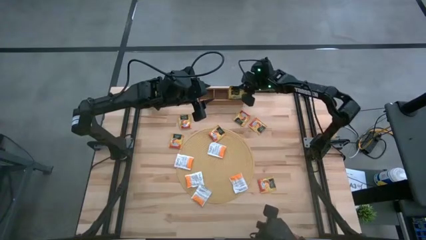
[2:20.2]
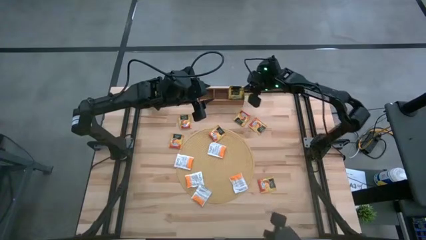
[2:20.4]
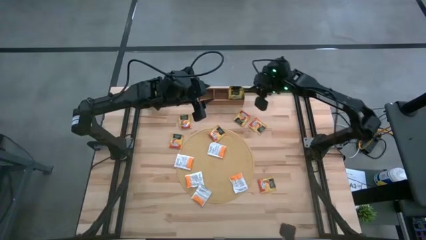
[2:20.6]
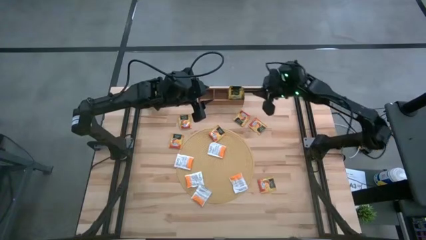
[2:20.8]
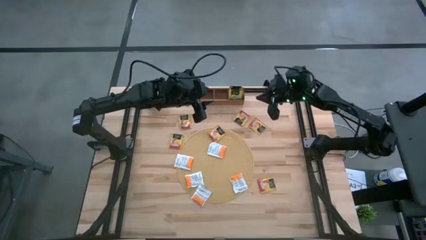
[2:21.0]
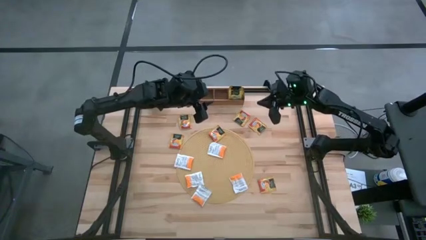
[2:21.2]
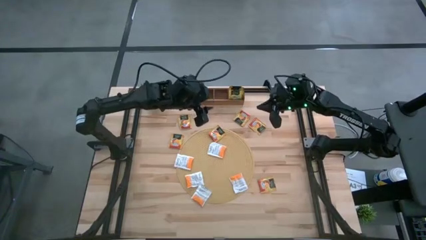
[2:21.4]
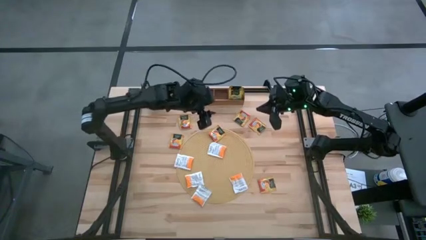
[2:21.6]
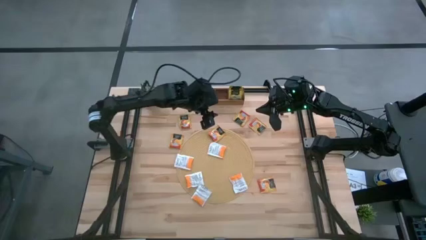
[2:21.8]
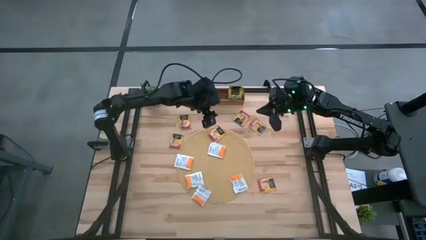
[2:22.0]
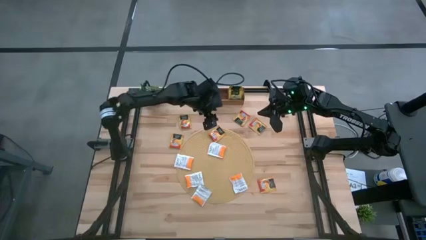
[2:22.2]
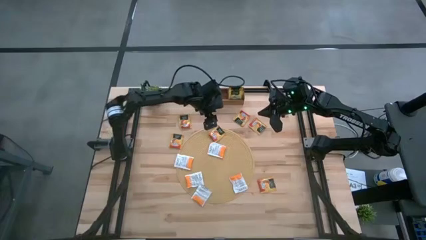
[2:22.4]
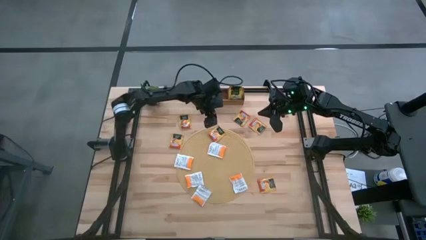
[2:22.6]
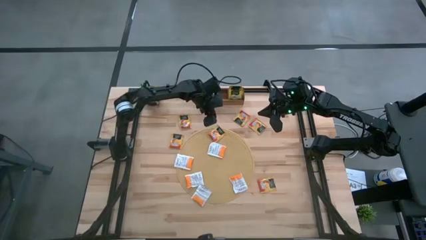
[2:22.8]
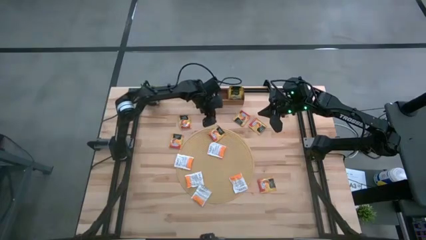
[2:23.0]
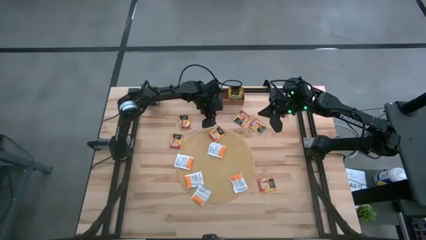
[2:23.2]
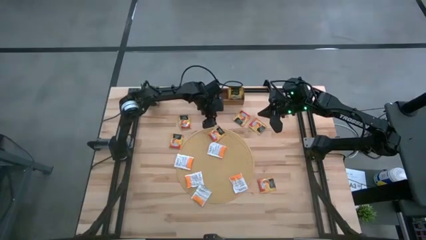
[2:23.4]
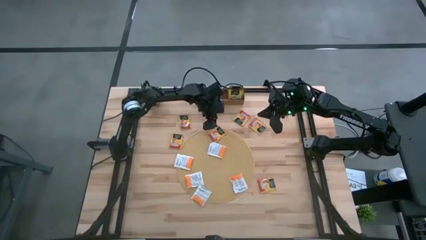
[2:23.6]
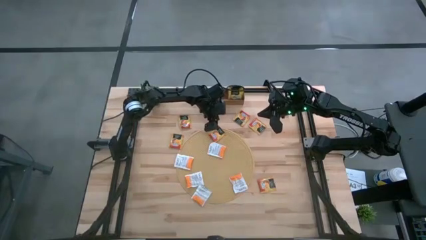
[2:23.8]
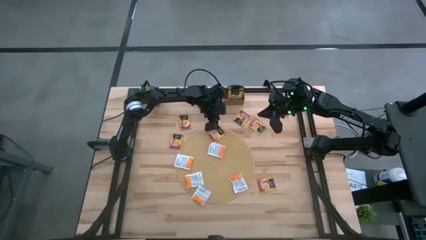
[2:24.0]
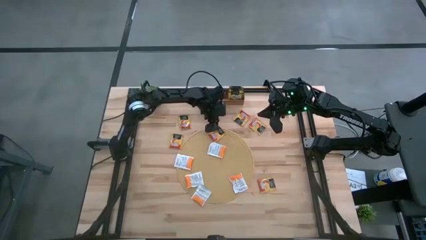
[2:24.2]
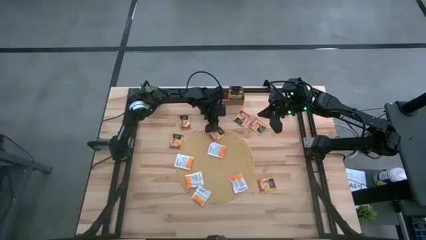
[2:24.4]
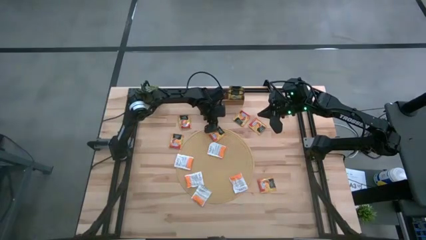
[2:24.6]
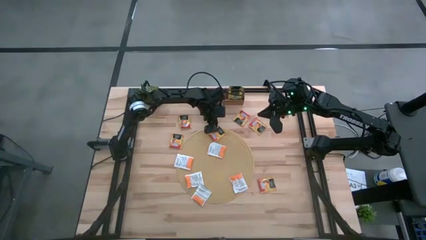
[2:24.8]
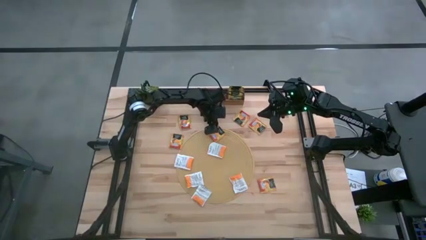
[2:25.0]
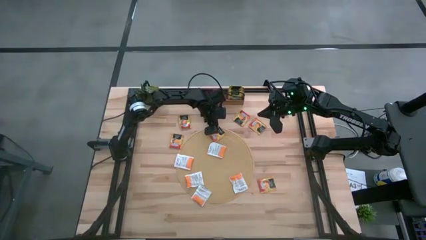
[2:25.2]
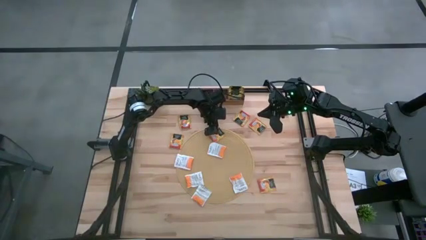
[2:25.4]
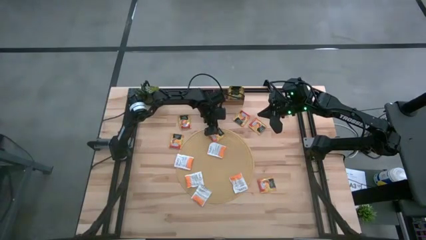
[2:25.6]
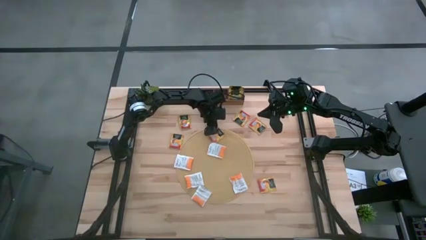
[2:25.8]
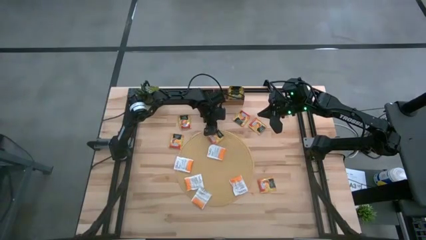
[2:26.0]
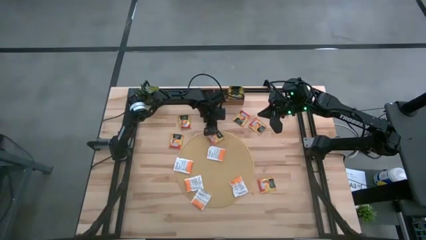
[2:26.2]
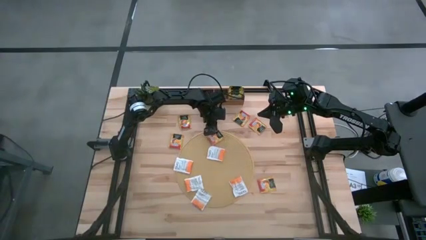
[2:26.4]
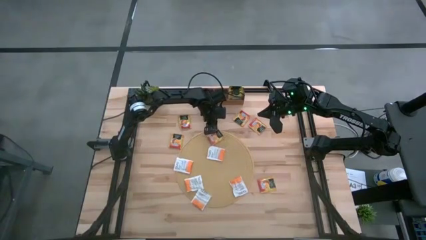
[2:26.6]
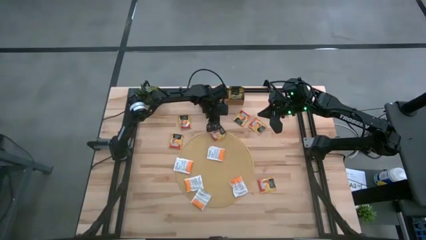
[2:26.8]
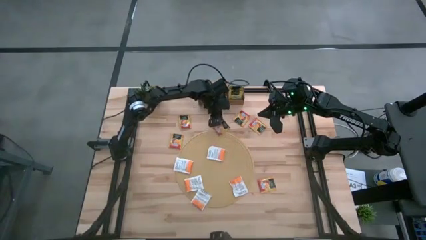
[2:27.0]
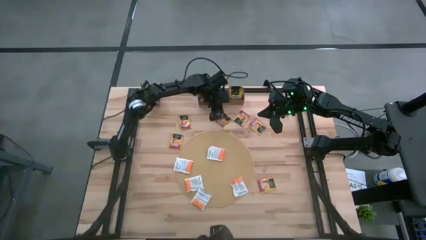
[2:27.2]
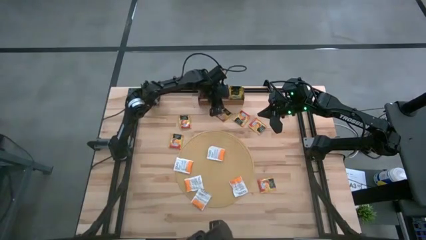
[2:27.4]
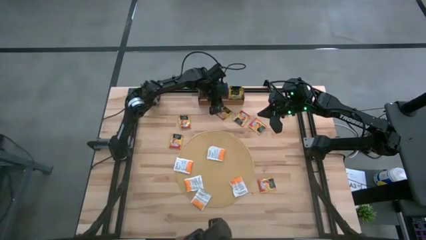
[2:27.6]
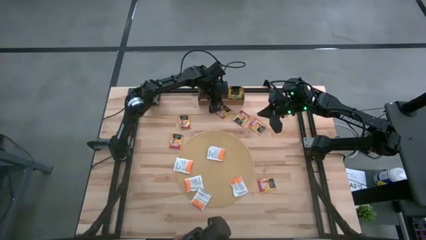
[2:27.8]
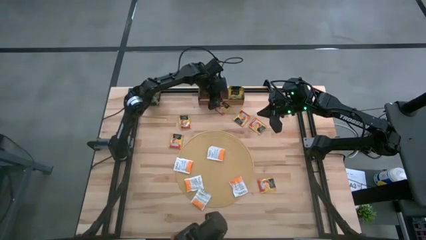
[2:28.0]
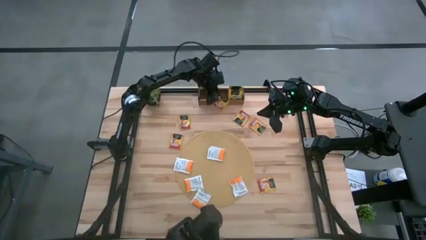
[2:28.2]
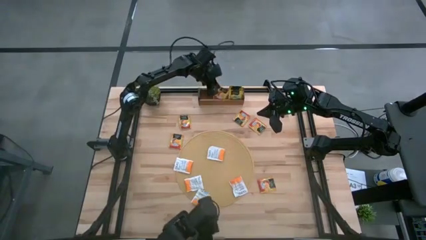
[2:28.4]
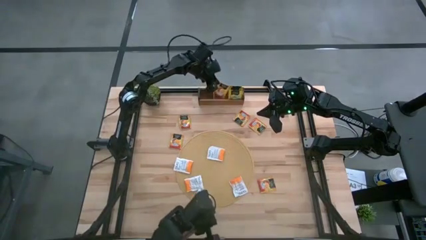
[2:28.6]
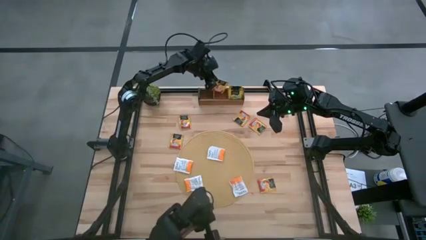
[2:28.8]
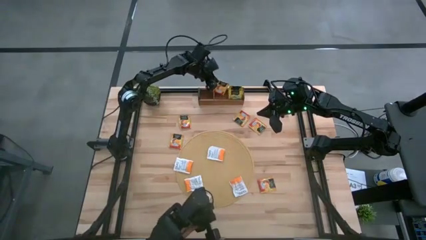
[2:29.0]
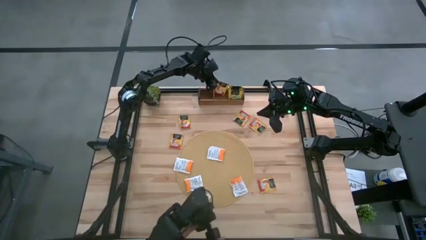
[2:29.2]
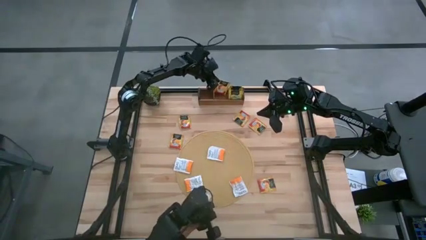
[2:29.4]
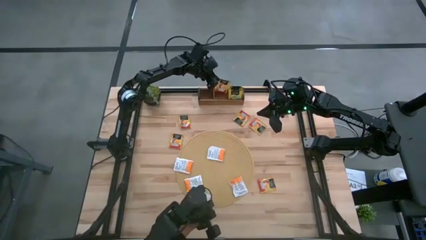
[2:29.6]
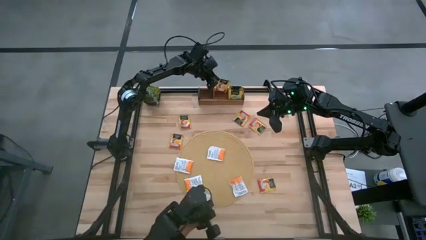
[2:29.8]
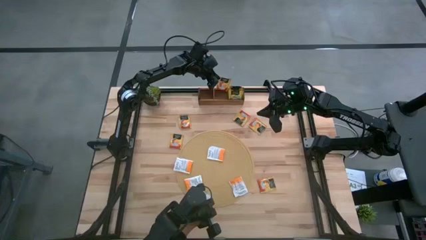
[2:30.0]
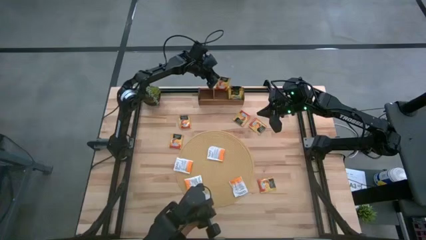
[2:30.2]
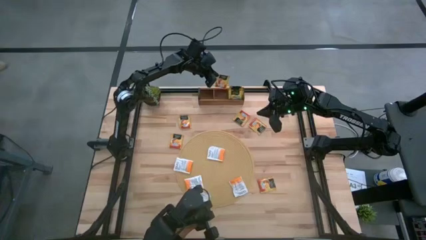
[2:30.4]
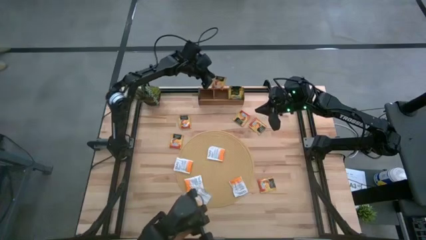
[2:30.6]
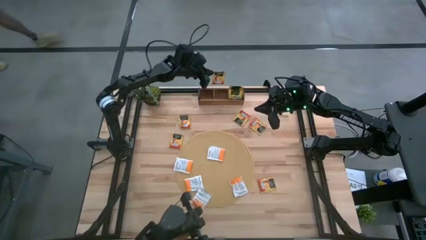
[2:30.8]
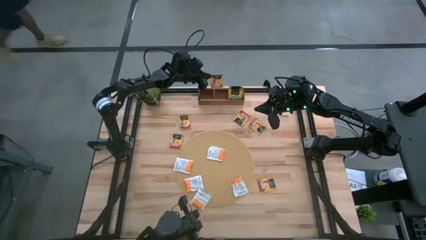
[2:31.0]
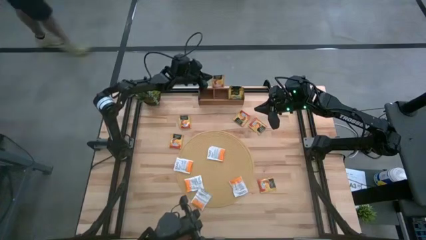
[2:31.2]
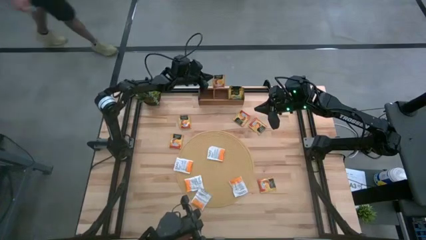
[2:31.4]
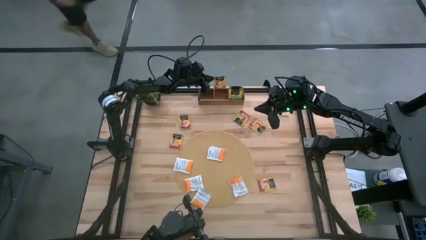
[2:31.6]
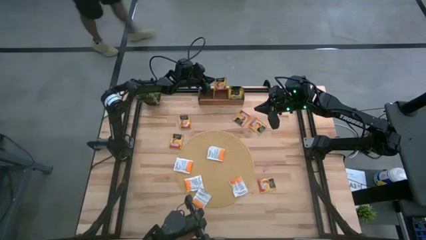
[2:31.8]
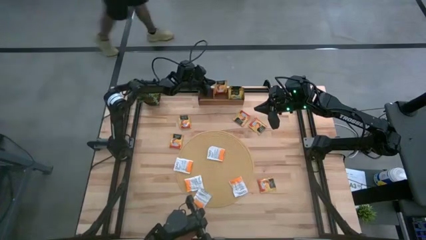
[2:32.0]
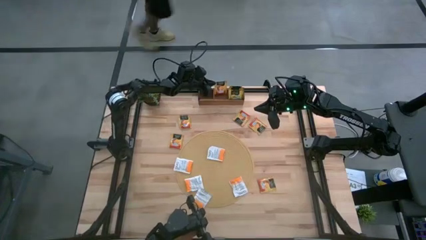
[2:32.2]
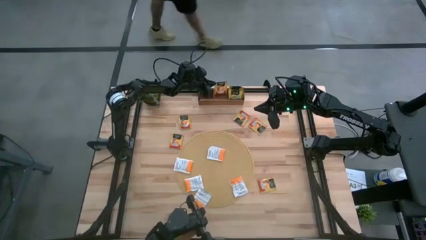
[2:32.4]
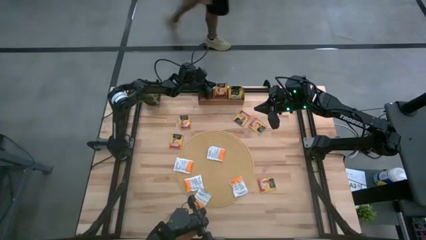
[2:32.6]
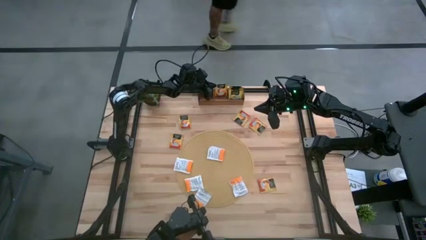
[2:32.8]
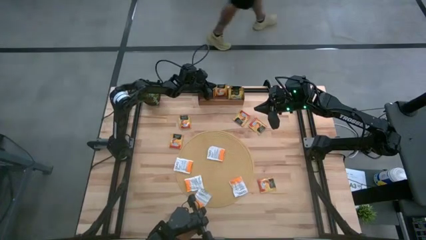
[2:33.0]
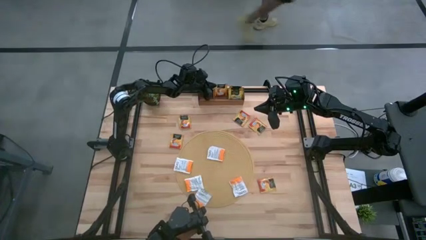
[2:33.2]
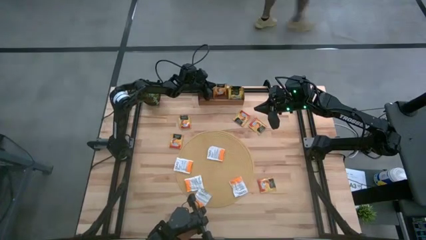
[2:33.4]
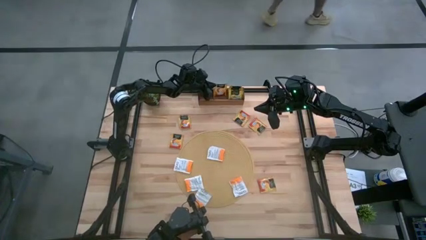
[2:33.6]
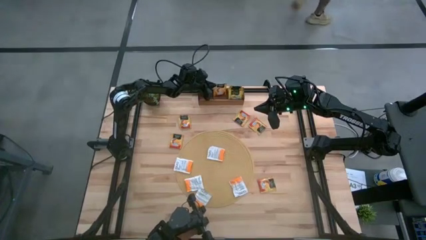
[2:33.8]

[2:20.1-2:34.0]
Task: Pick & Place Tea
Put the red tea bag into the middle section of the wooden organizer

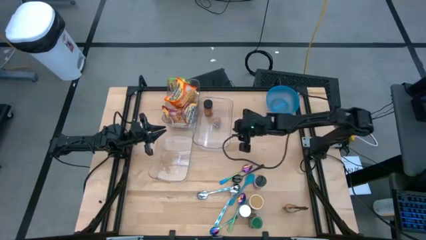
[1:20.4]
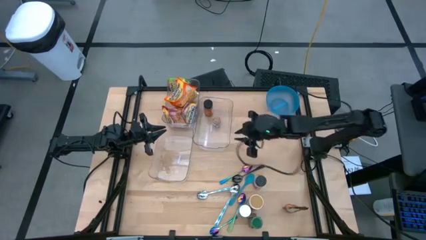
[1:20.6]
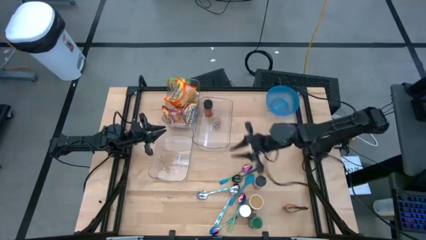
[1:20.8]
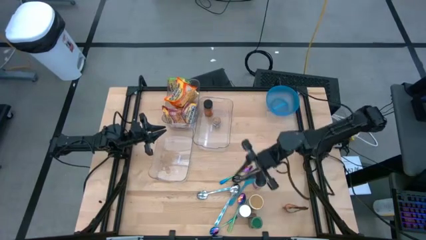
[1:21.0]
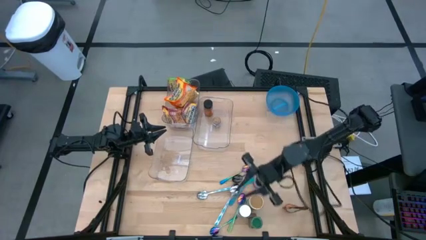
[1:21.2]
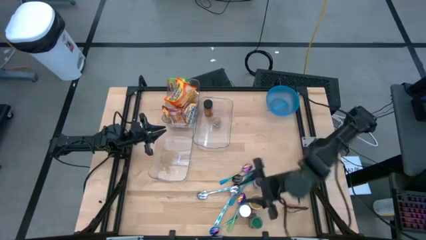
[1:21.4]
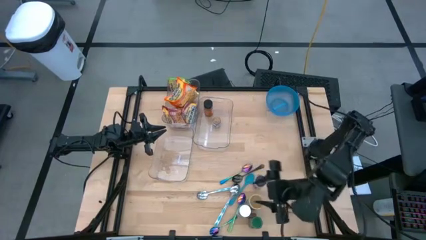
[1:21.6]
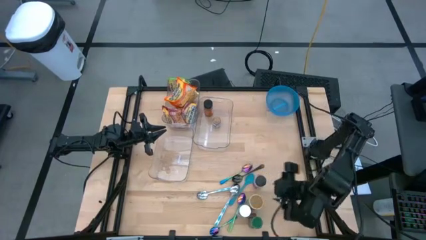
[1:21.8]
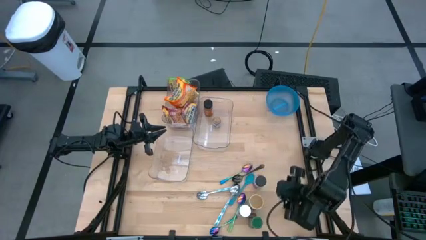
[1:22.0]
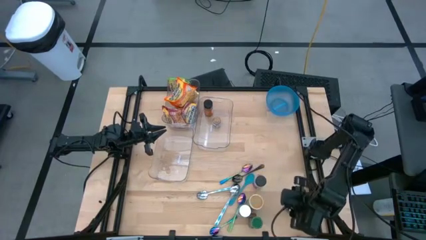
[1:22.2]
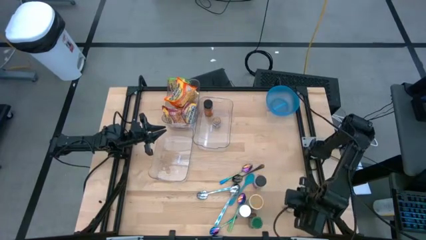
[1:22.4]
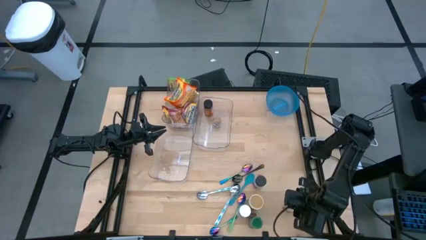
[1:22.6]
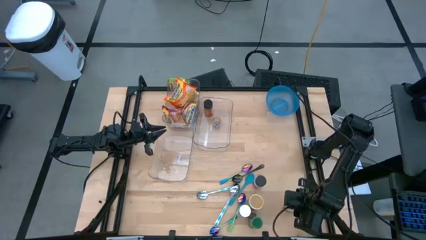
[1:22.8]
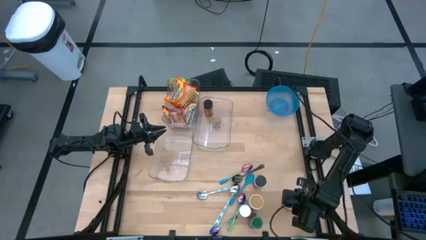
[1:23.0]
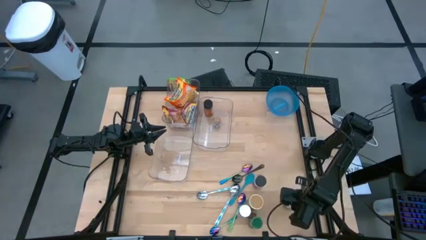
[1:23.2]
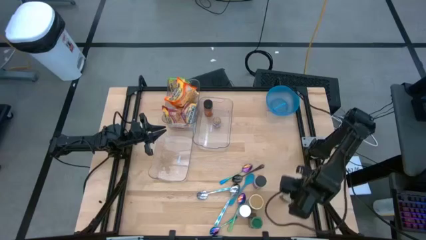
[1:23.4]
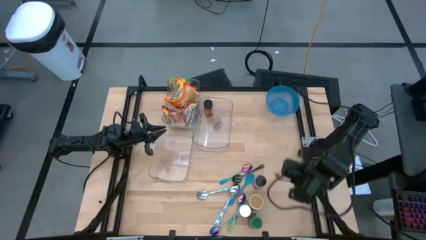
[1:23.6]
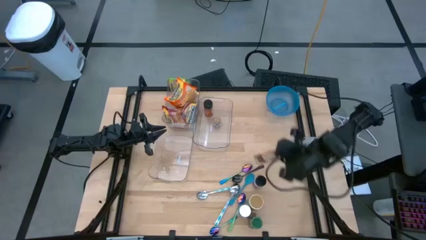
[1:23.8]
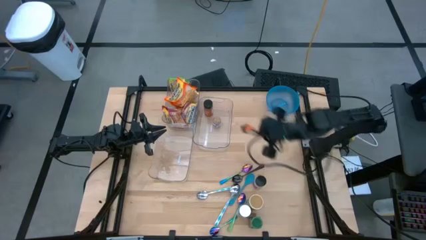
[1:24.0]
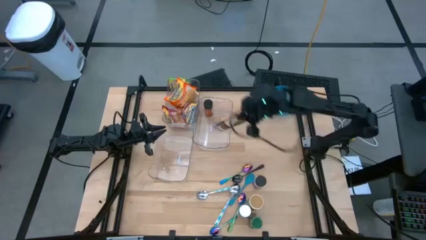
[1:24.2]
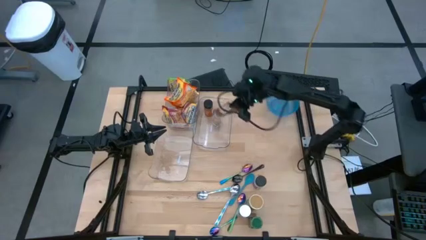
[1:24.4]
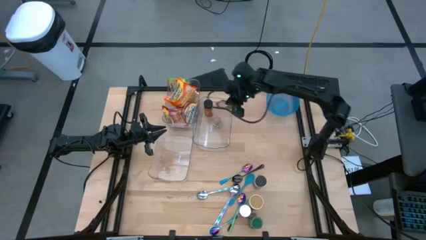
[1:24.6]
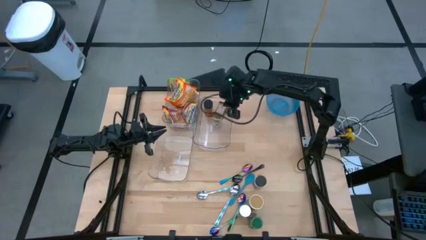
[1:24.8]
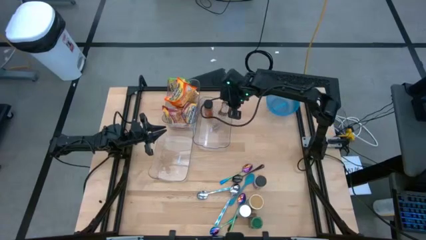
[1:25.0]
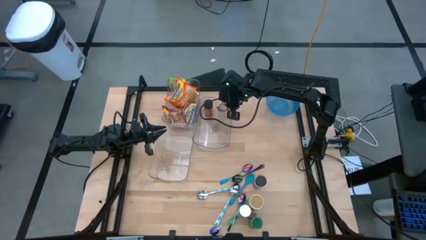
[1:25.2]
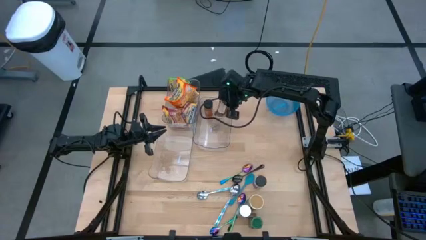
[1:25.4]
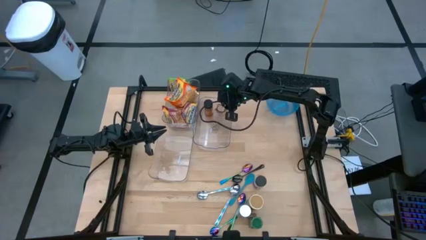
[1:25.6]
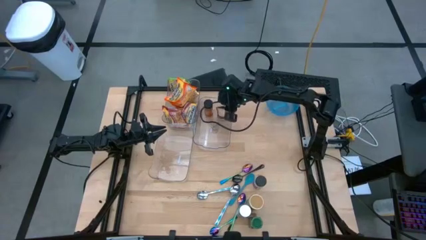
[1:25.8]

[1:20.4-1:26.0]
Task: Pick & Place Food Item
Put the orange spice pack into the middle transparent bin
